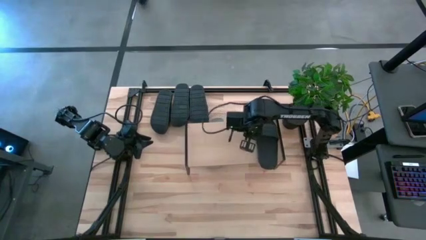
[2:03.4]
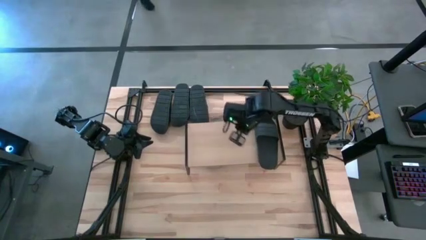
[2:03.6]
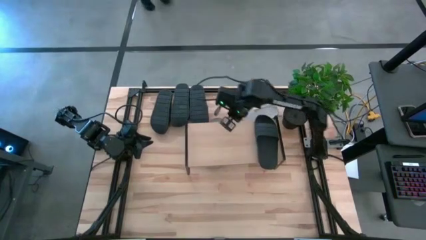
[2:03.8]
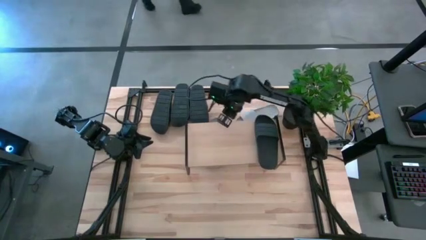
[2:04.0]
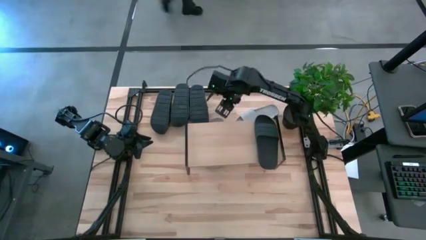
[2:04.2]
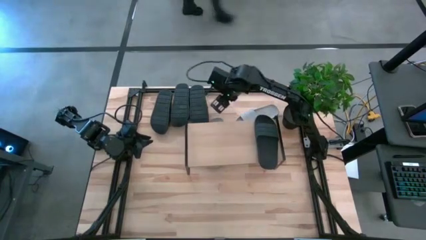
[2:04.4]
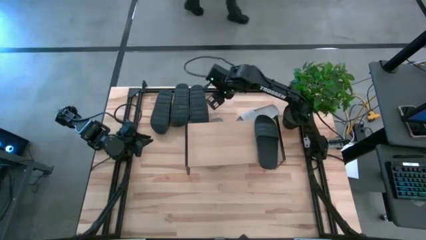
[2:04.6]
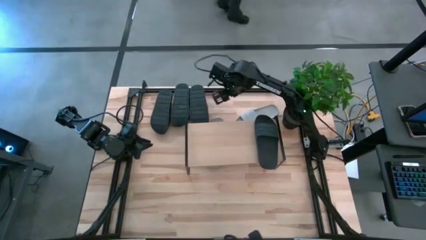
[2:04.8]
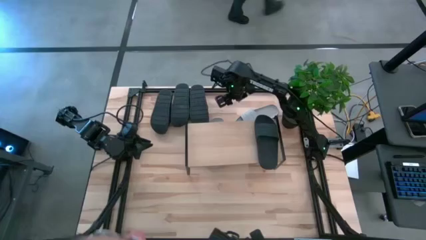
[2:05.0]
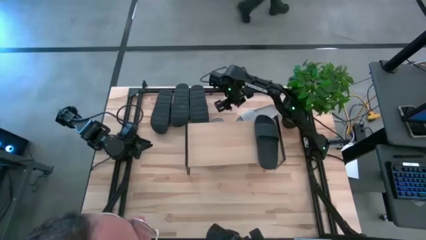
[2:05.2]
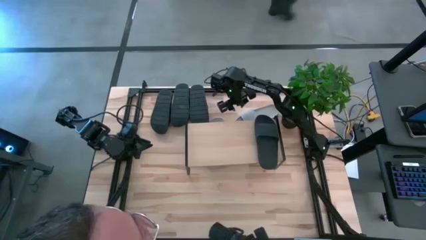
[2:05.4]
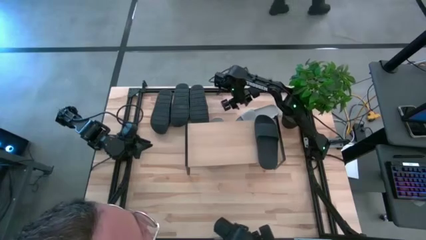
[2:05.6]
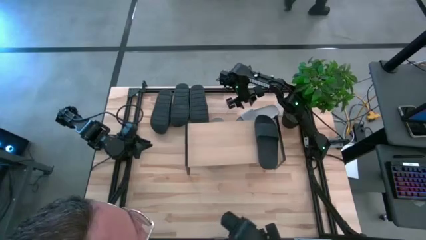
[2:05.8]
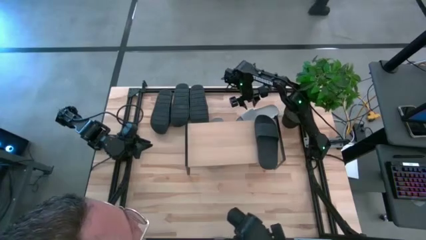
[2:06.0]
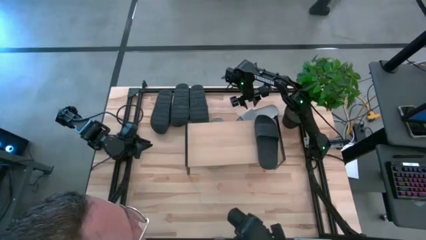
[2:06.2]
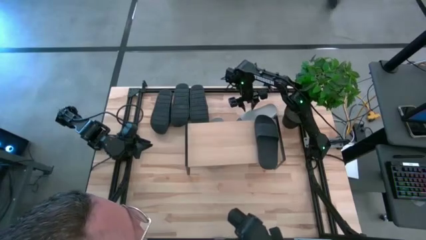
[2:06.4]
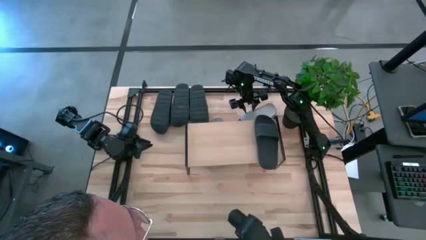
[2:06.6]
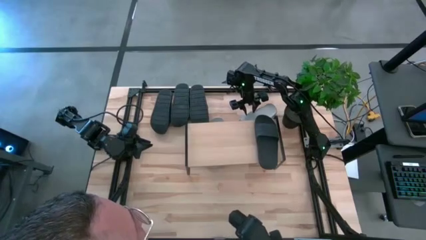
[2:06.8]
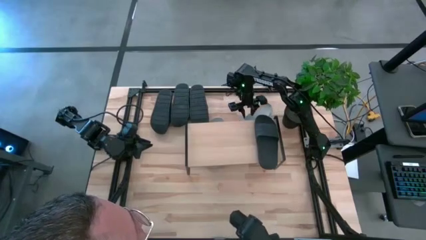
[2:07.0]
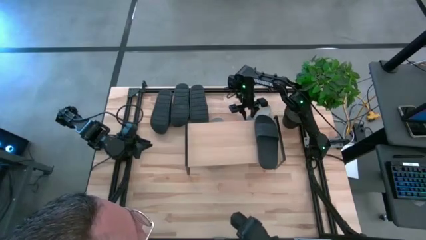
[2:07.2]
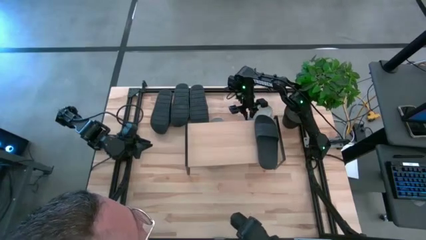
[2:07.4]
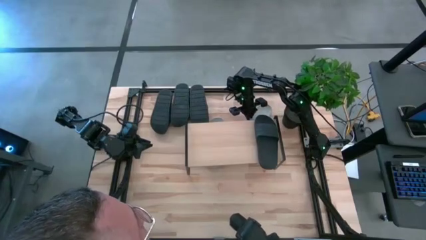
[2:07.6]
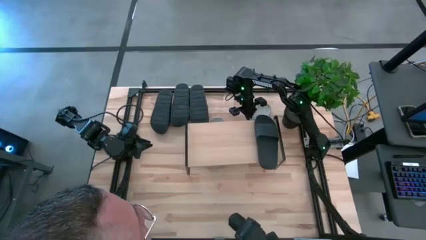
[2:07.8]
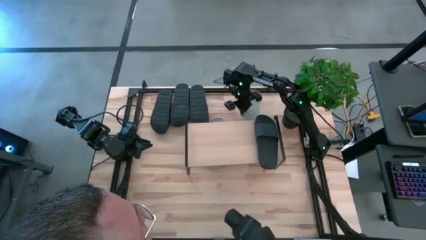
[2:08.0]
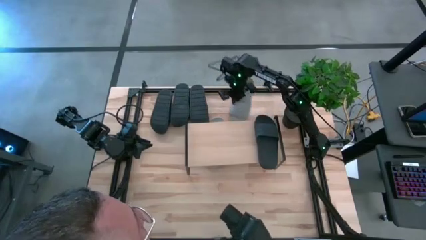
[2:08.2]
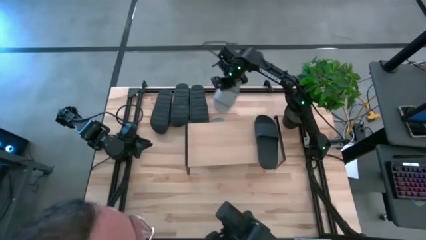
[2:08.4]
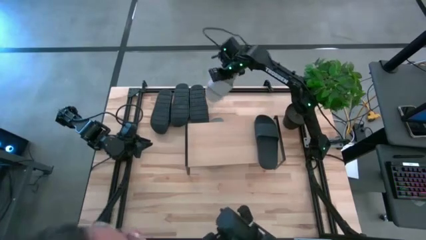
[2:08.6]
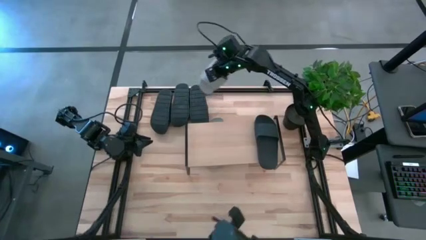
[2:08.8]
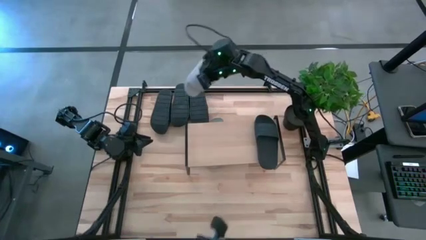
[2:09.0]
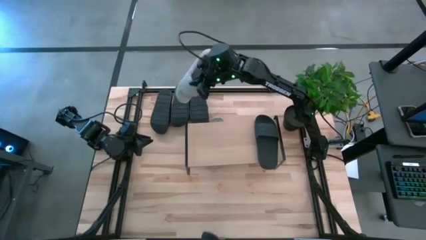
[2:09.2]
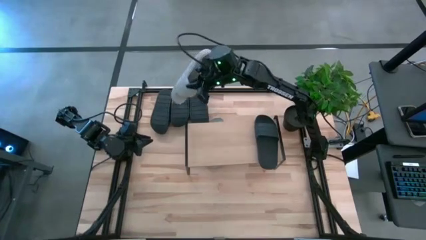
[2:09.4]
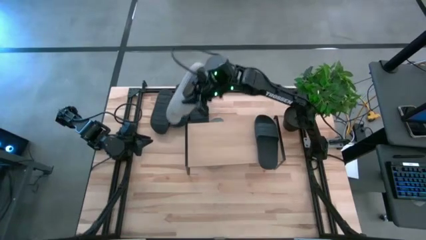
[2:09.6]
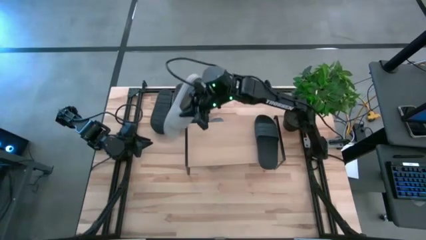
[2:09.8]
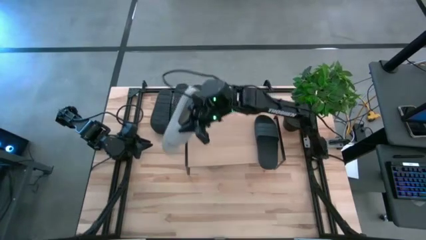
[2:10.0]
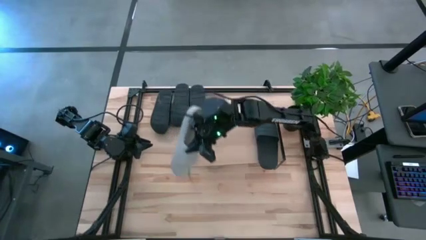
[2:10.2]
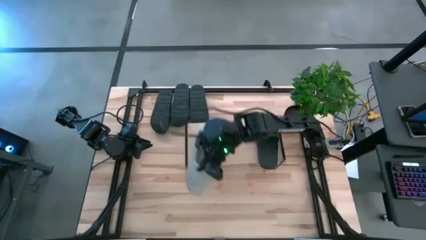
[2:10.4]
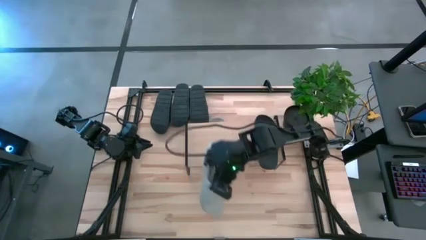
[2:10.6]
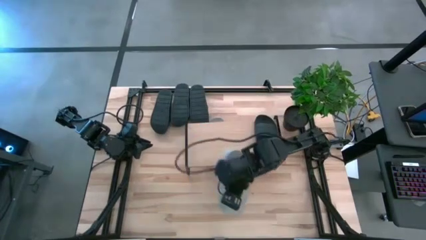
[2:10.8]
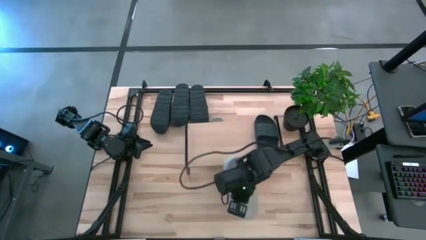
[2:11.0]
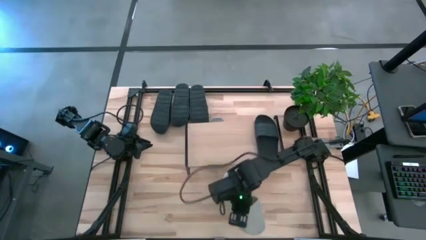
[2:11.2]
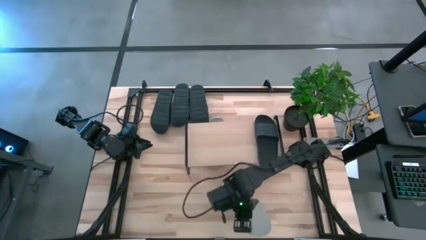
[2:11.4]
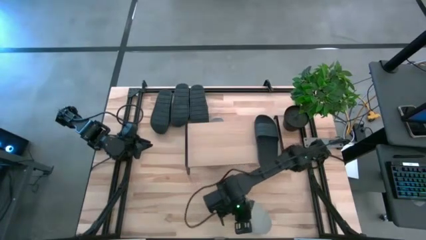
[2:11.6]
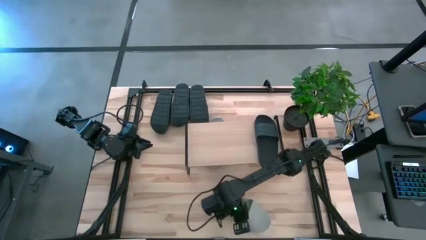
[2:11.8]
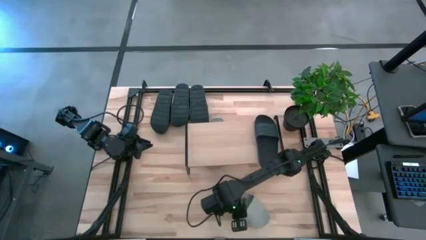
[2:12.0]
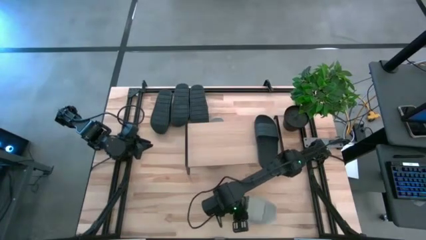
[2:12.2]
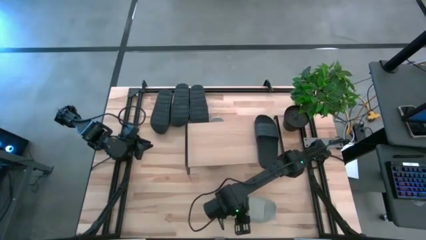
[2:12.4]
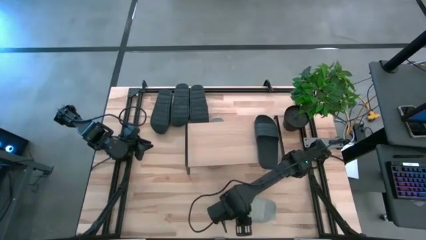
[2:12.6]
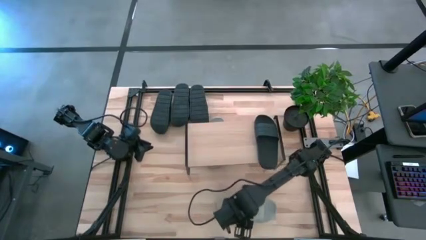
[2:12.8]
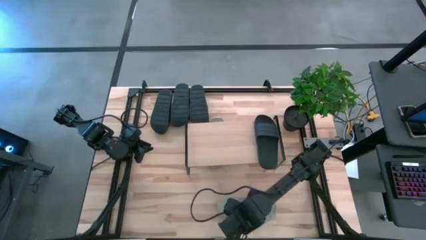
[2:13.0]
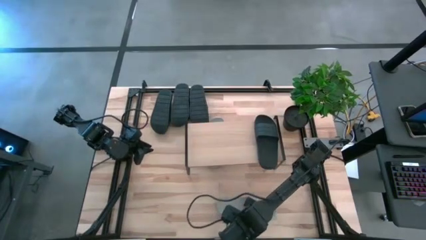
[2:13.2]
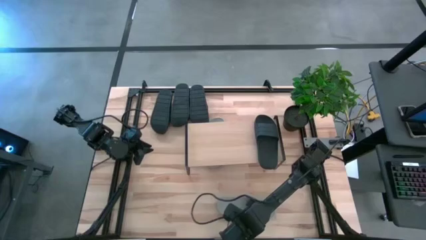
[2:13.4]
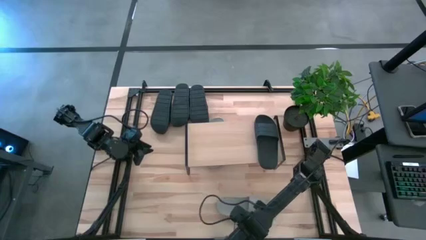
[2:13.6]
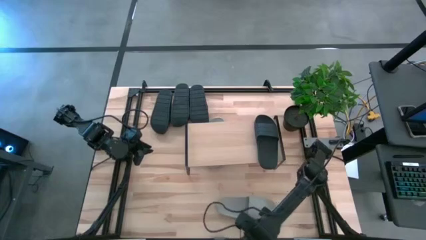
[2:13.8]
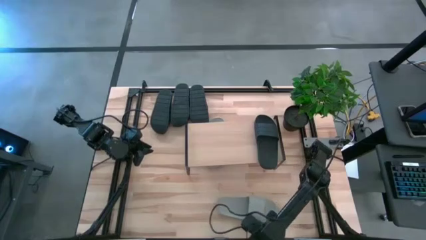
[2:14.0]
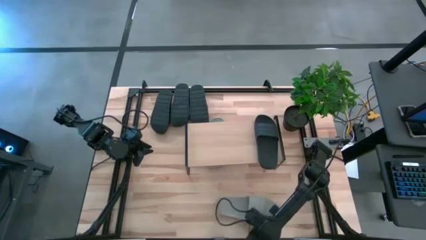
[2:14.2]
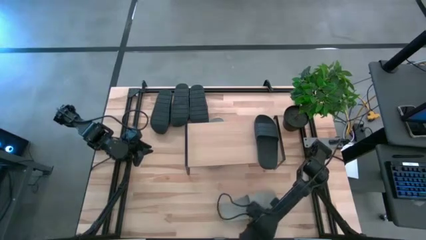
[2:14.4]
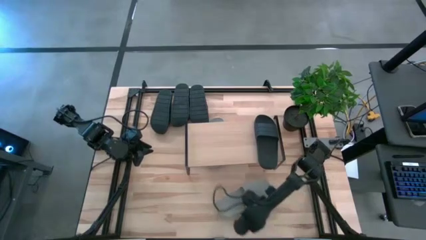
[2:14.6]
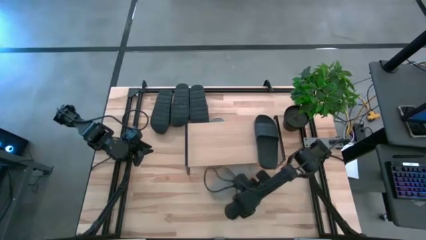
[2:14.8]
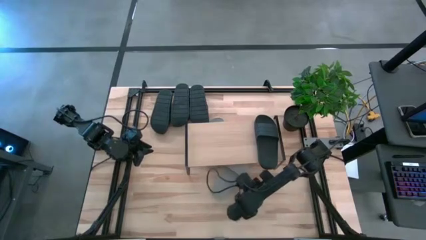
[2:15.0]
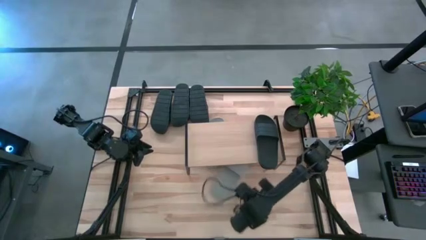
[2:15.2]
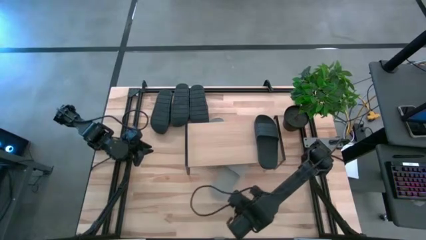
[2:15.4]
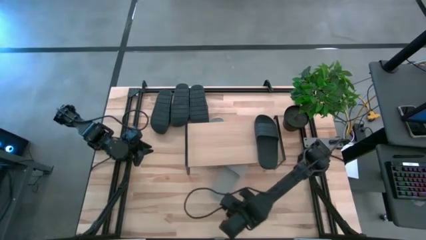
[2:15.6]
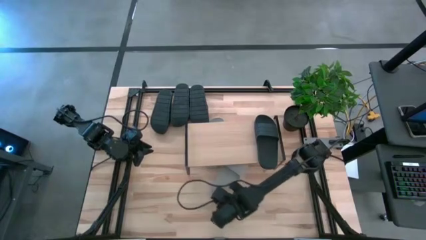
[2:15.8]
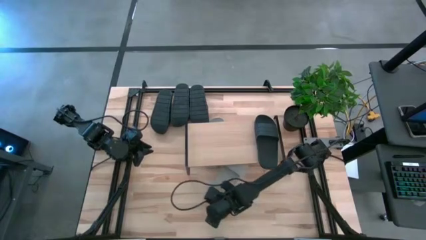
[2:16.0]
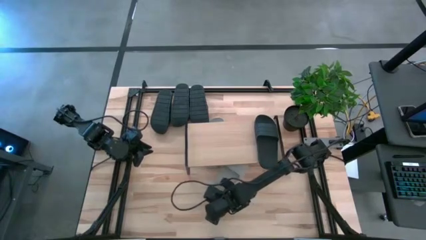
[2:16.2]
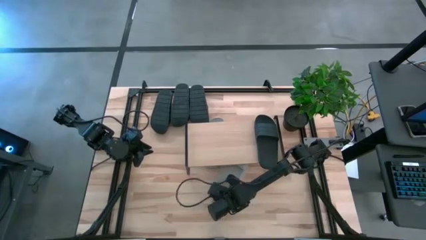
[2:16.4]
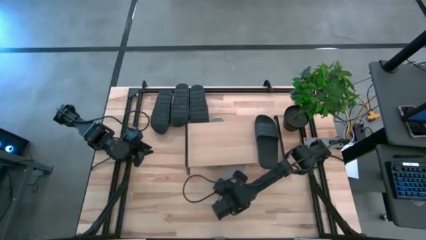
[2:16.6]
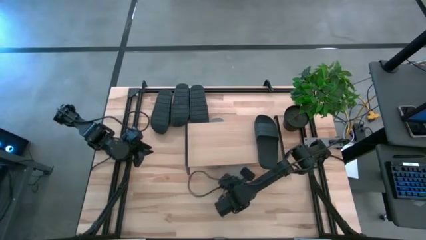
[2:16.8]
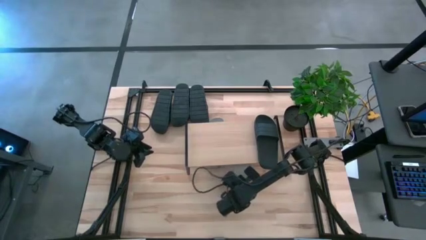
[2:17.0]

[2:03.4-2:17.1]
Task: Pick and place slides into the shelf
Put the gray slipper under the shelf

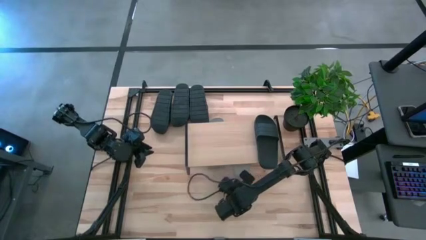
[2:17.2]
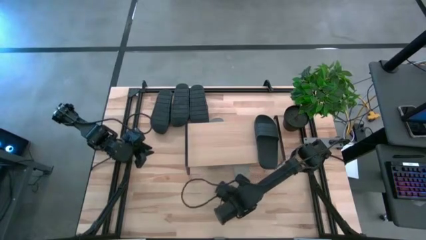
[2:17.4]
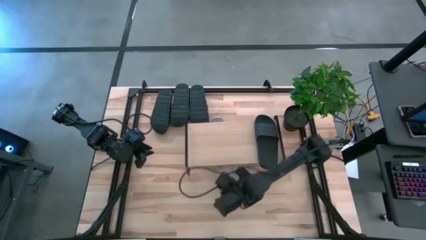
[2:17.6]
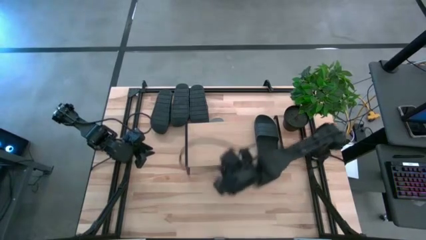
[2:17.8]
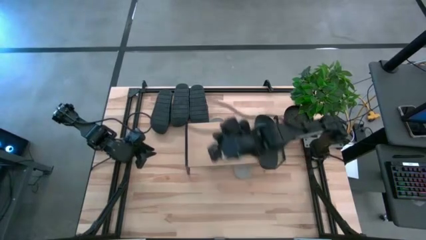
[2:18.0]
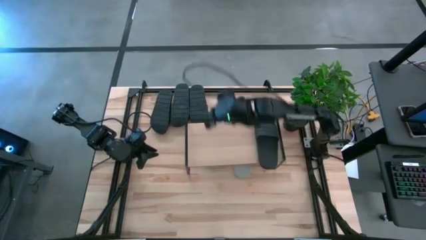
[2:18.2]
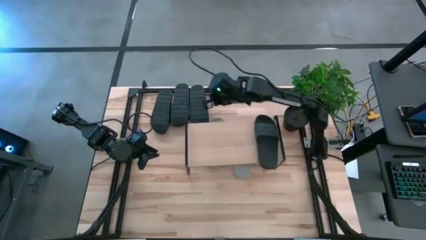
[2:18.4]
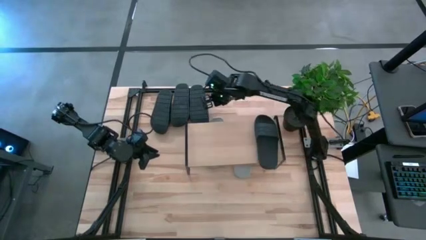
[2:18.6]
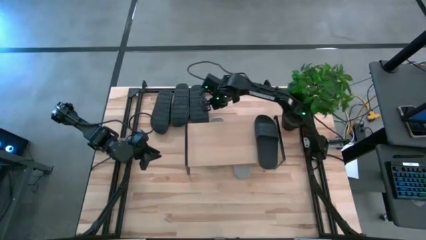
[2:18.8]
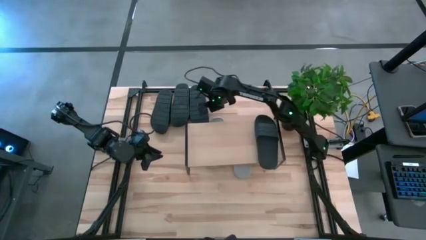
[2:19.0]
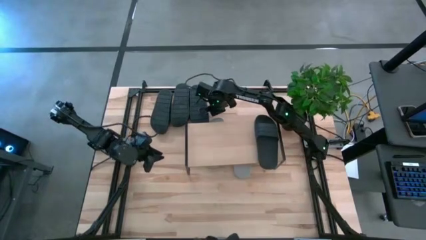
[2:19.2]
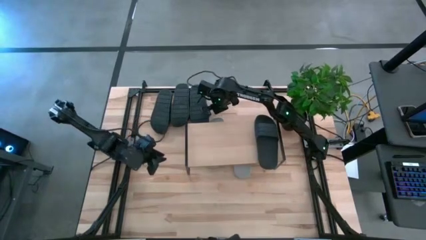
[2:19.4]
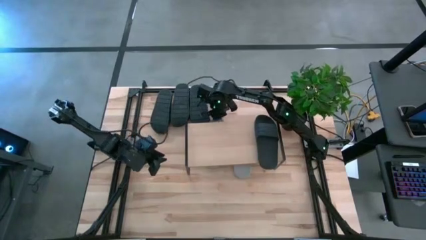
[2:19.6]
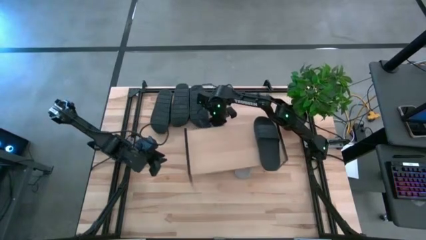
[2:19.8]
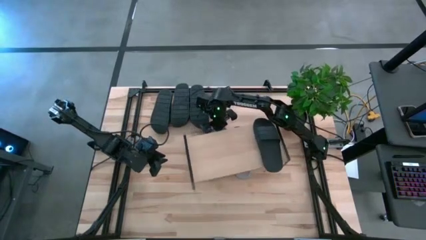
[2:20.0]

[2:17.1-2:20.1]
Adjust the gray slipper under the shelf

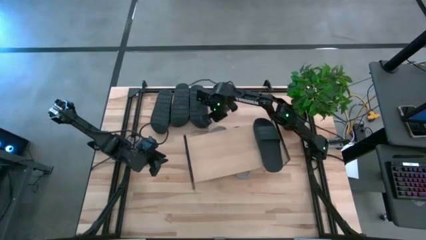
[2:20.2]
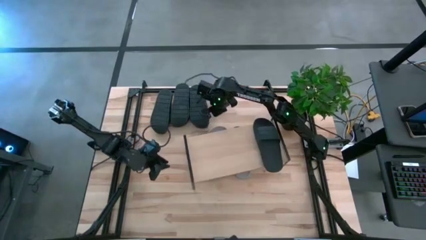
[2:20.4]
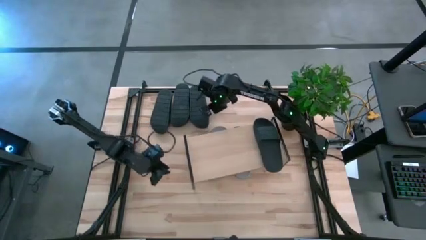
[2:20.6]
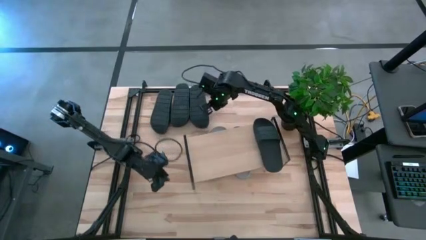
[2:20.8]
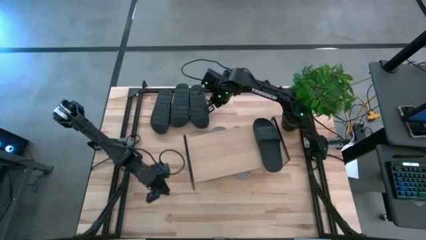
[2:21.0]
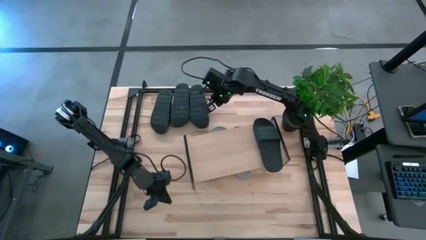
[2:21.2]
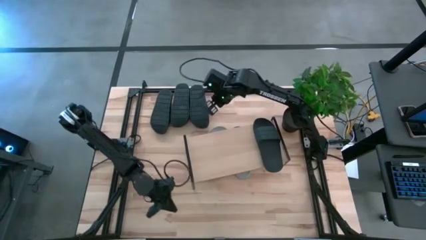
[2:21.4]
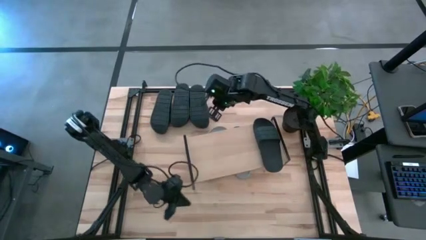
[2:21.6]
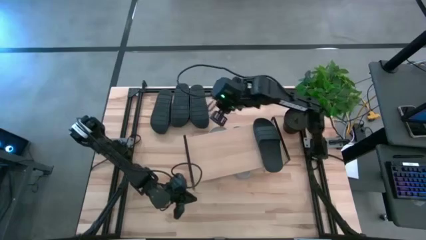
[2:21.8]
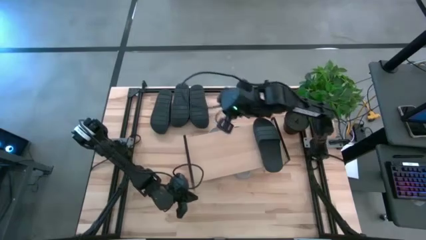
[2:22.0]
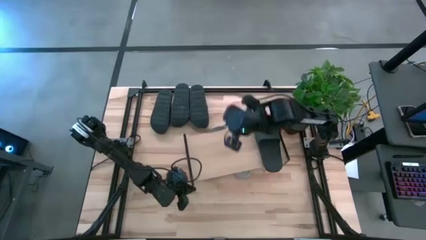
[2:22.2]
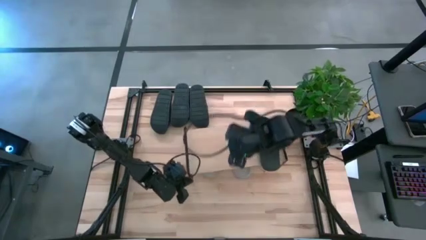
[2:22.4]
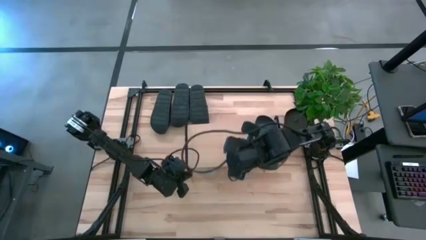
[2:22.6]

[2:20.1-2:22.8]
Adjust the shelf
